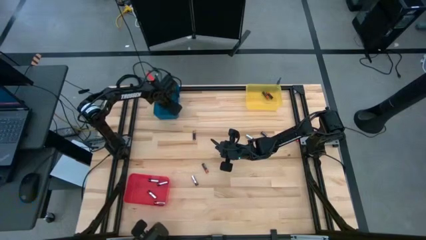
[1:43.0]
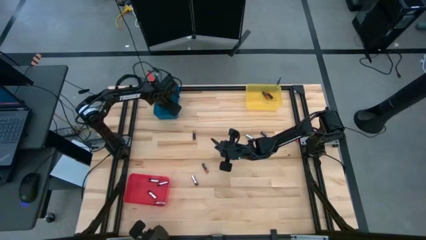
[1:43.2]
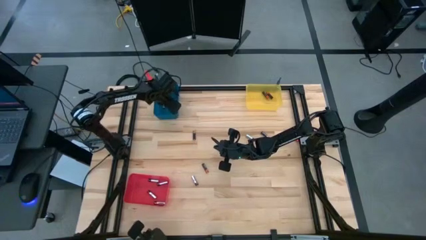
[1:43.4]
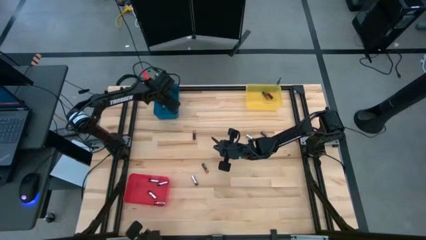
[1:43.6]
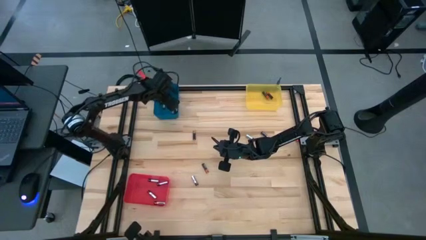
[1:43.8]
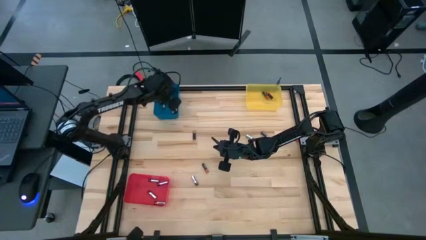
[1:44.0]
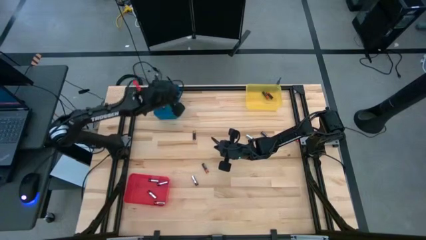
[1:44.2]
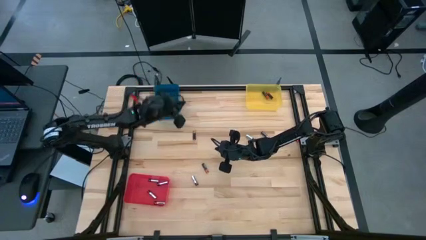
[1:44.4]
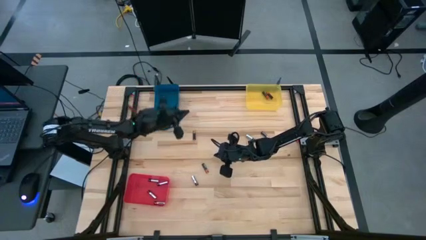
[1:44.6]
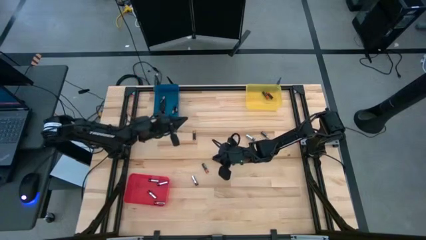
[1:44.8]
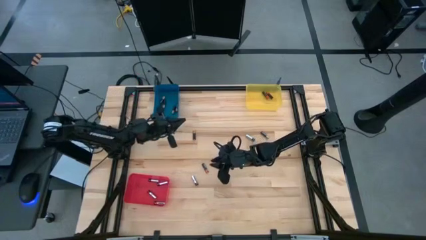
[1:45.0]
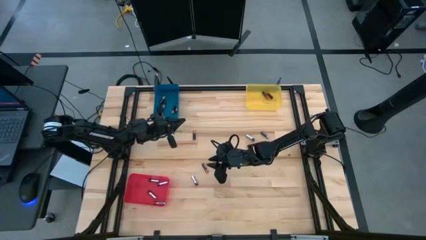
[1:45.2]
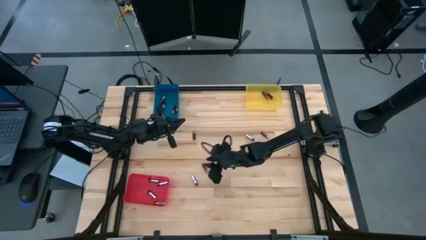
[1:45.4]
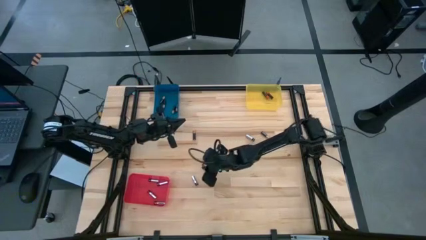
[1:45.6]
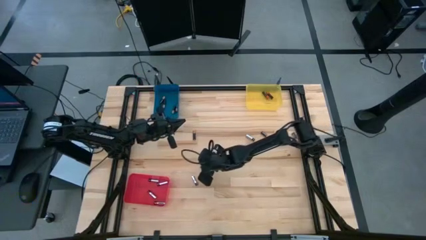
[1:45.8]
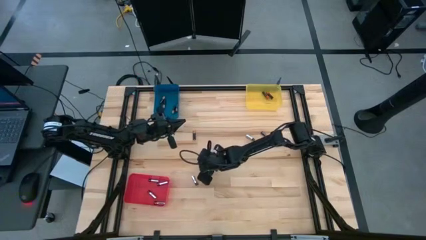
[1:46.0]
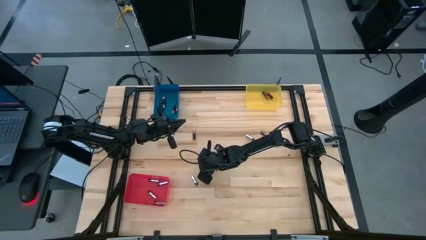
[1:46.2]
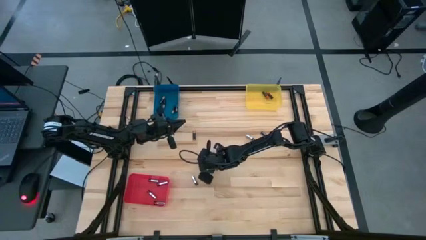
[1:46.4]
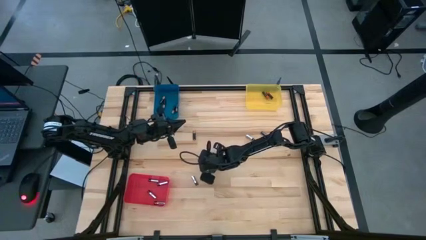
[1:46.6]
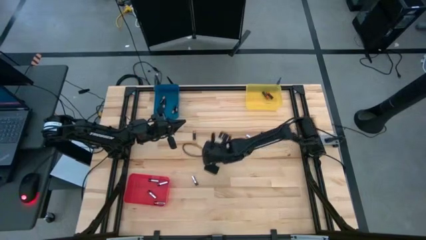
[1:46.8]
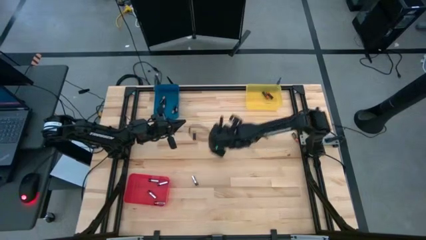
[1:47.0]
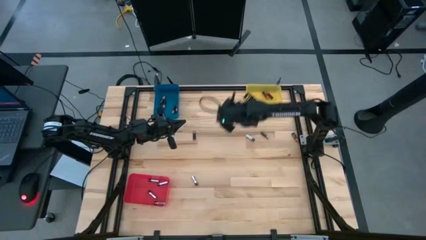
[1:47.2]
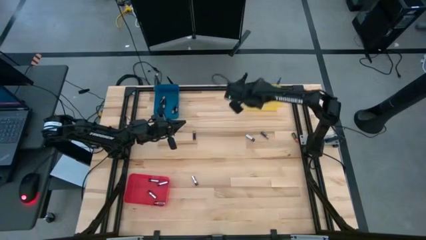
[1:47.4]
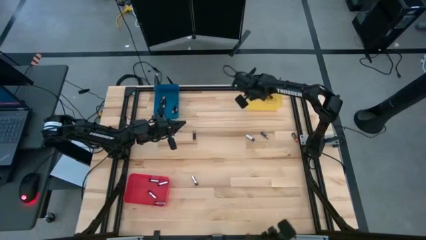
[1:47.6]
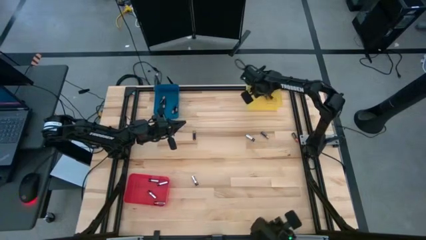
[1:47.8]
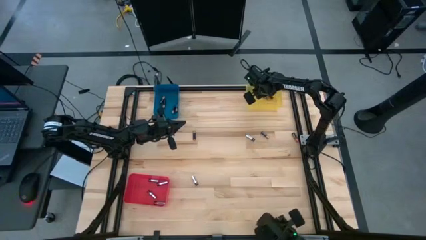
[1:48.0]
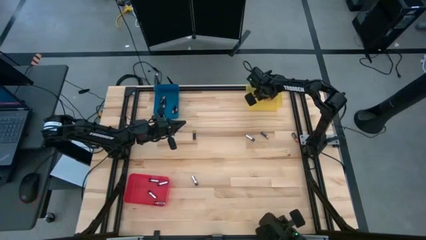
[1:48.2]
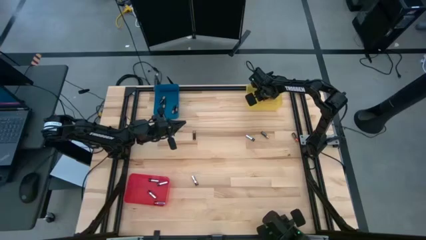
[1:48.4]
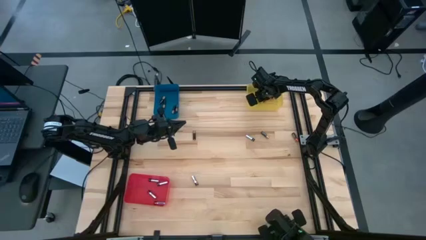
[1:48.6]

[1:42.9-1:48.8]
Task: Sort batteries
Put the red battery into the yellow bin

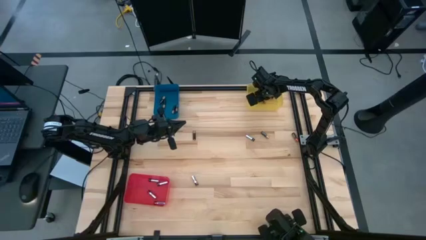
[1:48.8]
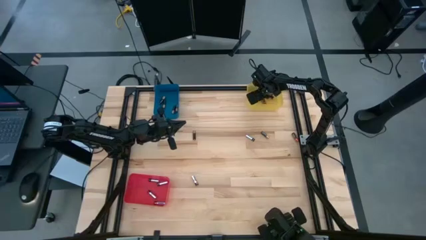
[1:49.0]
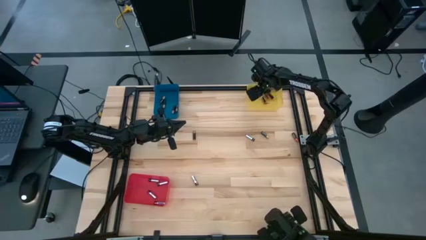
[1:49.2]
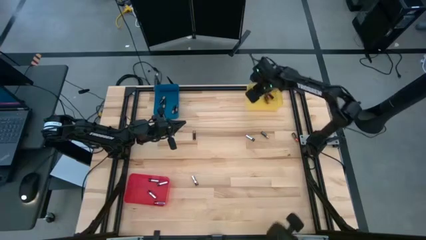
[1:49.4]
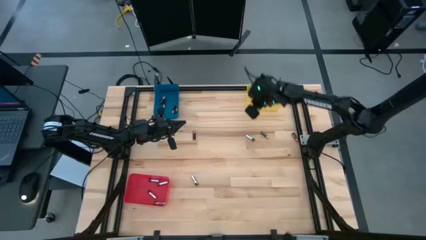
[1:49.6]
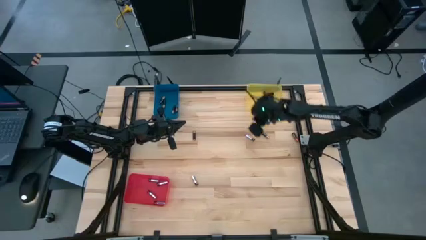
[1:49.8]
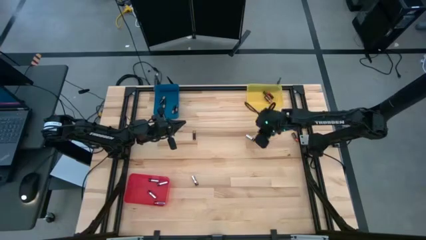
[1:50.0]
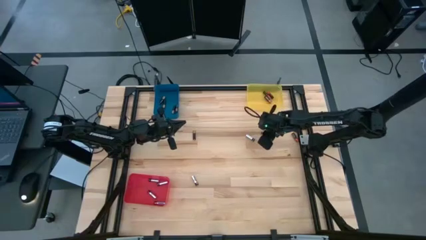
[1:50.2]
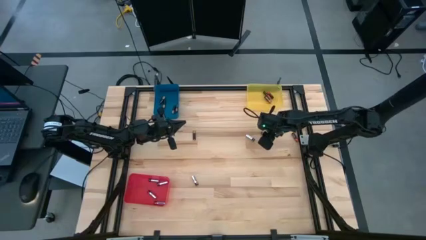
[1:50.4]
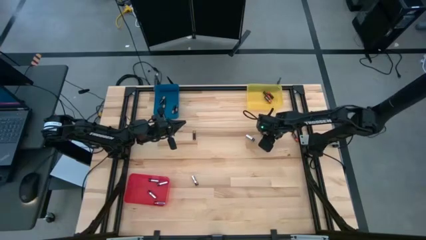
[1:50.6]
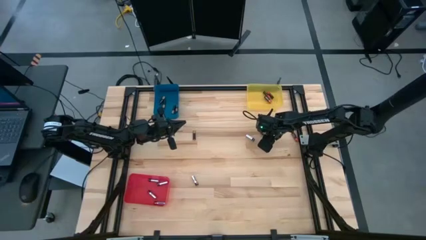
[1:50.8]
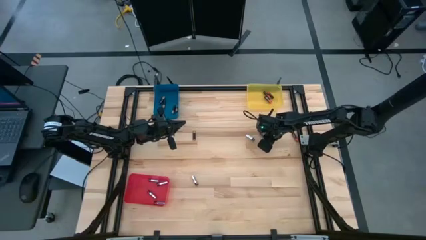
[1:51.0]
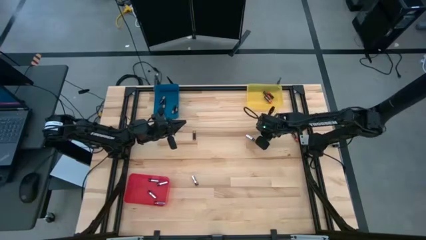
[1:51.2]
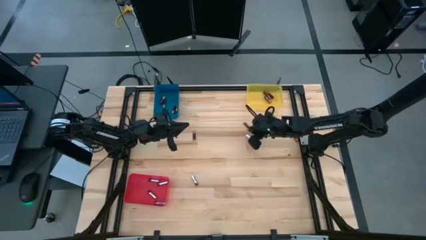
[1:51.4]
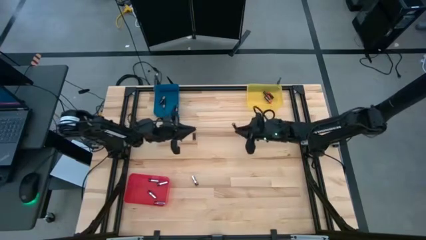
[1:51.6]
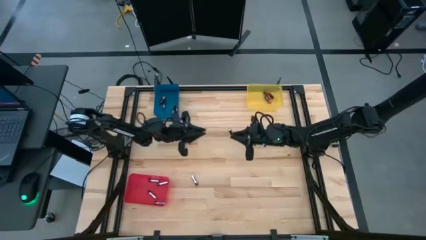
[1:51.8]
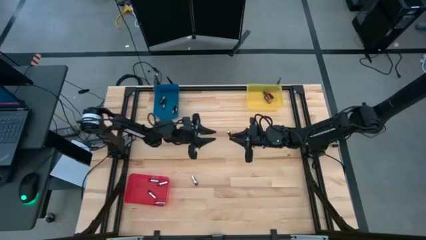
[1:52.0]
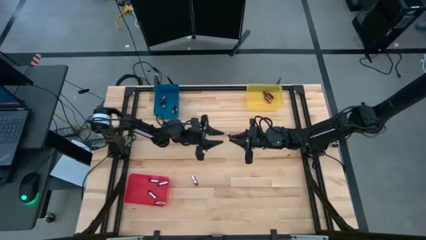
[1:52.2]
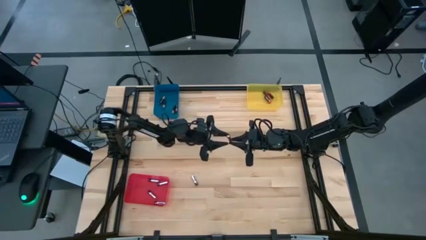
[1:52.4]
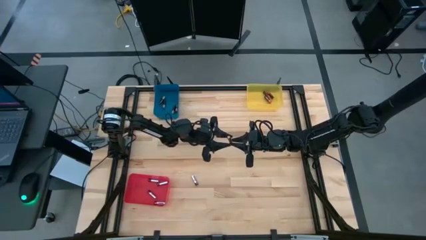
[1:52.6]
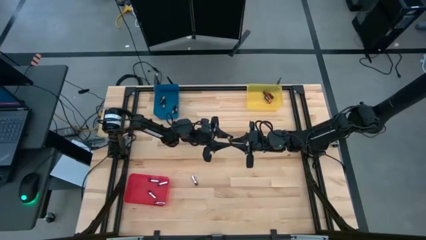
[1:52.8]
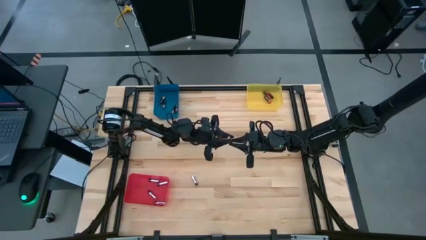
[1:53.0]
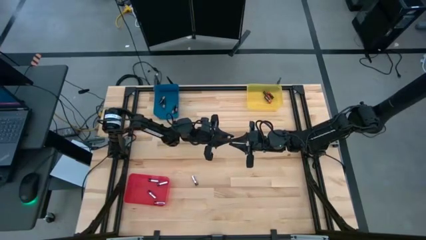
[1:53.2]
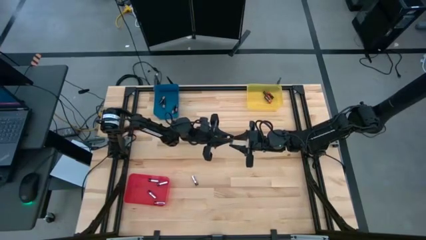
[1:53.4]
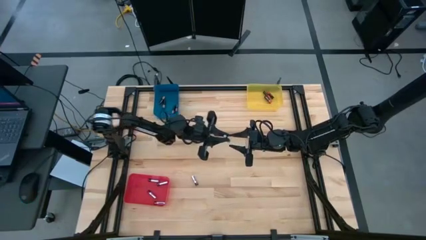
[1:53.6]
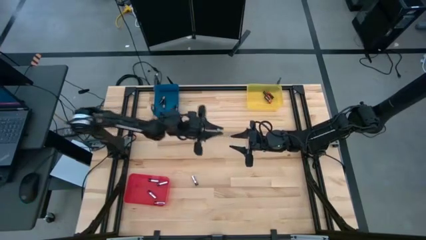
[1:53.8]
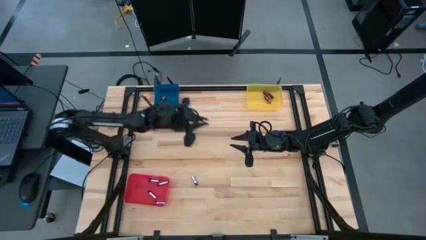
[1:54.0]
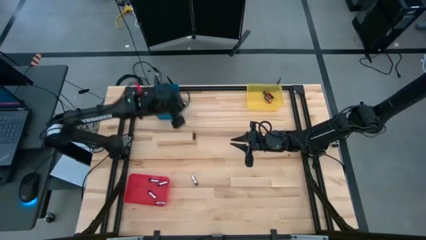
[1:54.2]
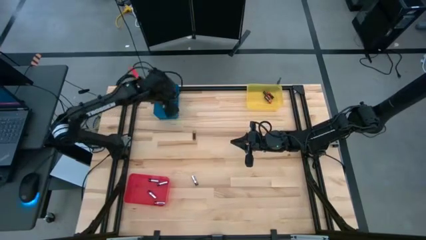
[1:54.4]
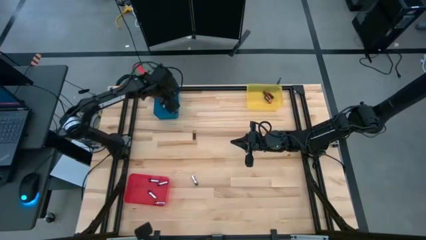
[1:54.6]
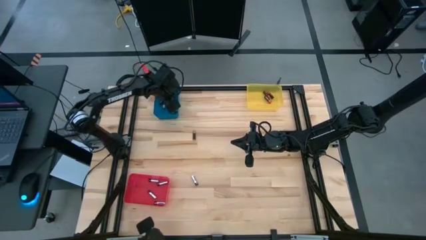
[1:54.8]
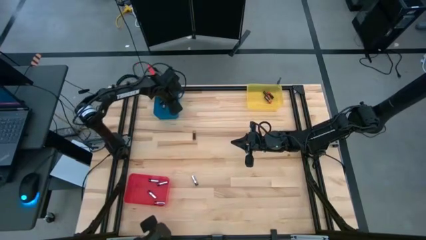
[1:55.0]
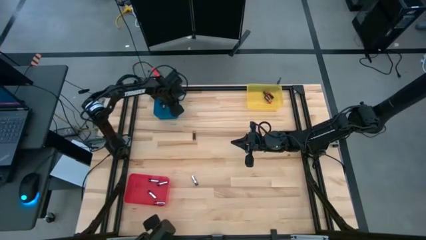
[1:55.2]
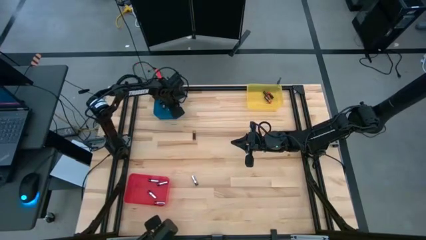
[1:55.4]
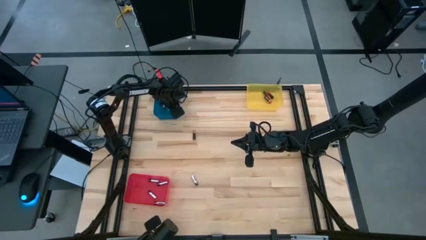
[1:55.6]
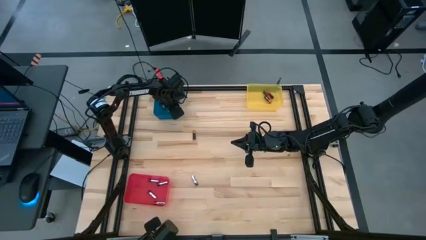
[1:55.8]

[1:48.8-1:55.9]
Put the black battery into the blue bin

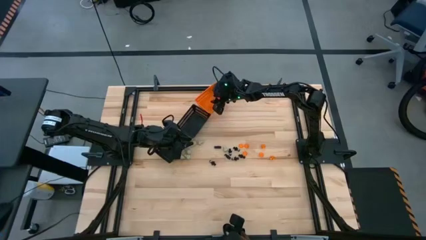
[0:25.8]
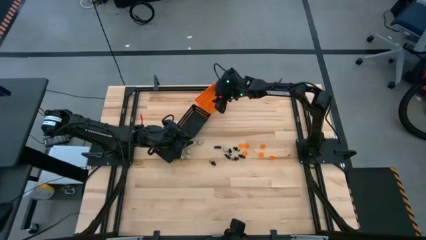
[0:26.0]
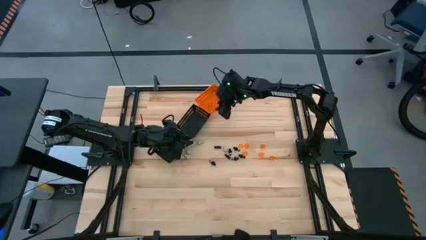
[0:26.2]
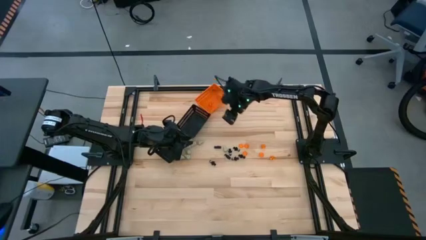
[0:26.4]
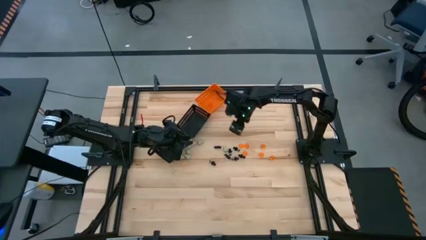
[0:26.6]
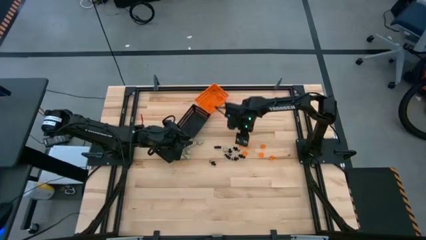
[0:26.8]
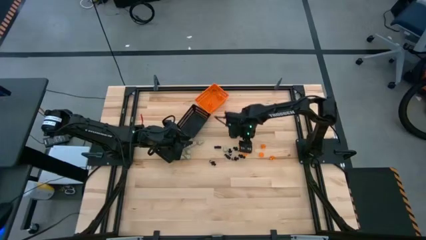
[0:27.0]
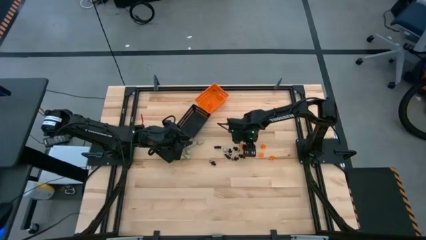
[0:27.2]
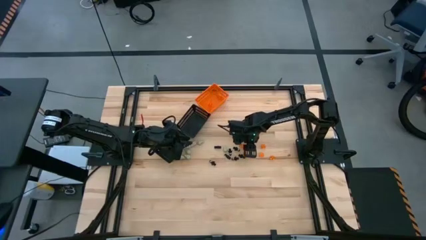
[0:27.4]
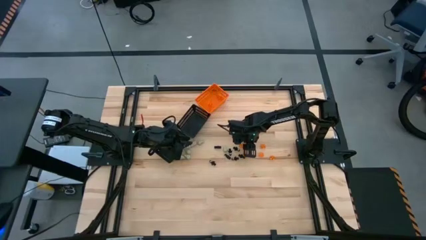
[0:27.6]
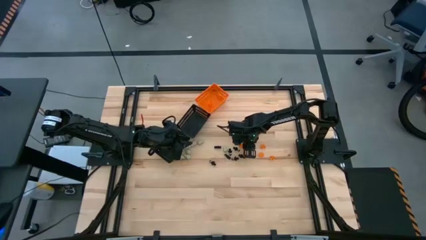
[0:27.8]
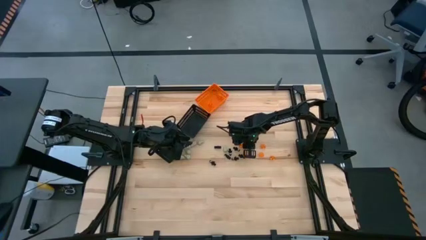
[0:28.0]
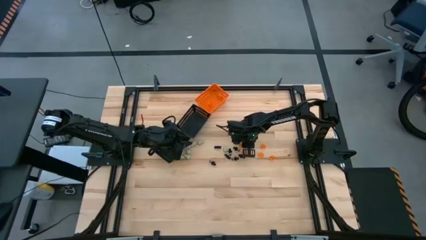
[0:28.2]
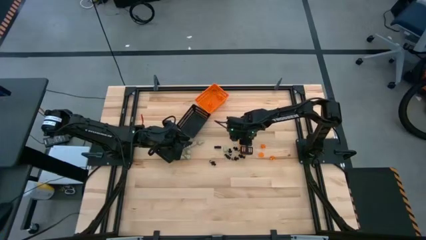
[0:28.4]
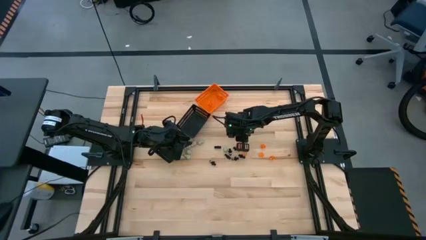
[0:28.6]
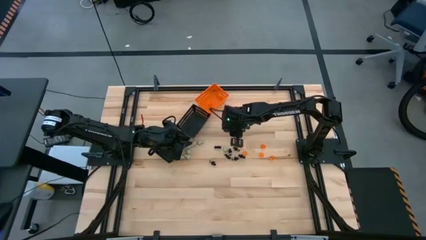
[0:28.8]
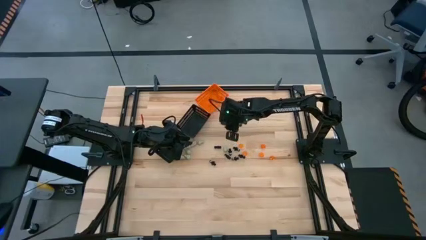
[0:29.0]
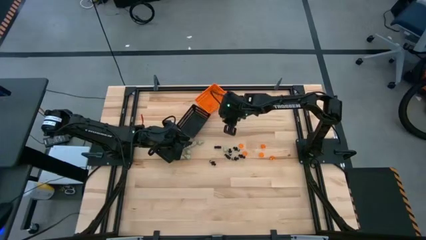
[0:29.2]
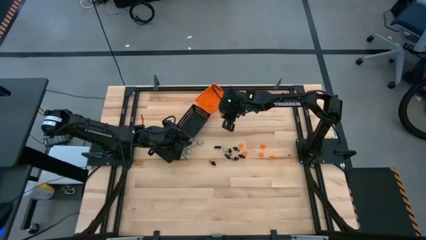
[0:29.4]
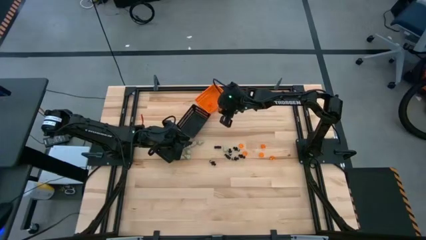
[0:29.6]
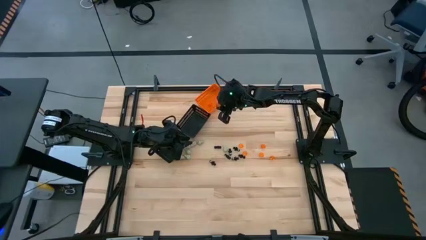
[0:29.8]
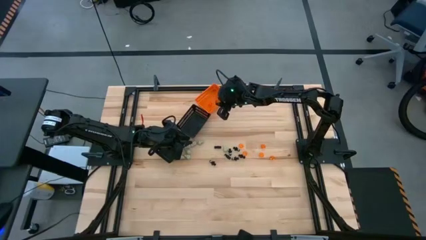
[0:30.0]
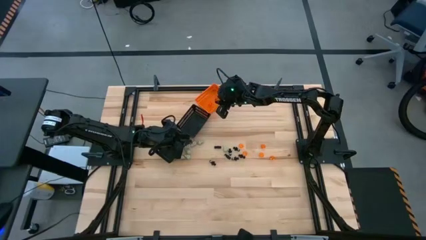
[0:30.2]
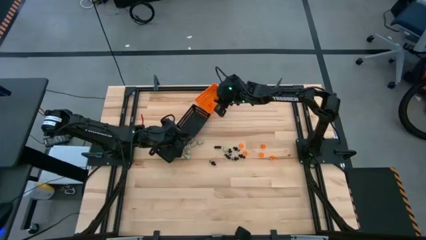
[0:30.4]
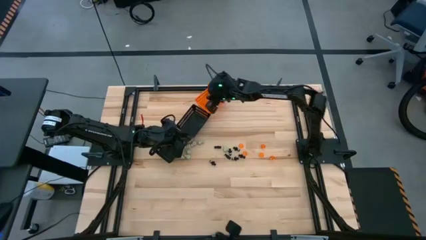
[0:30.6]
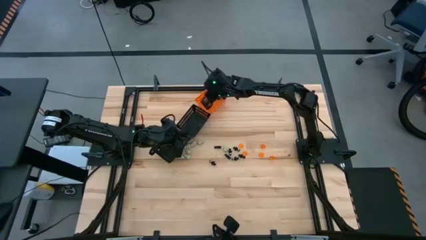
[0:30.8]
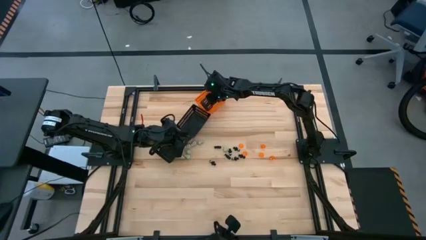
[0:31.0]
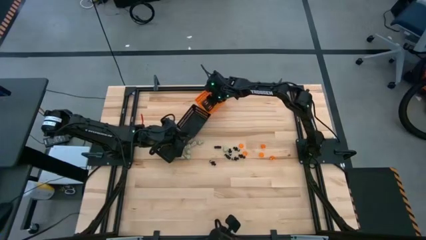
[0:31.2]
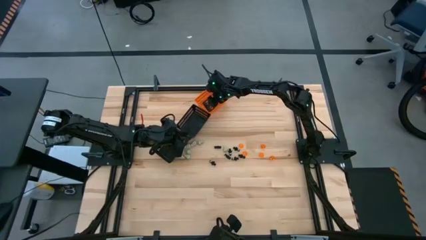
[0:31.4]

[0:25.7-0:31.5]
Task: Sort Halloween decoration
Put the orange pumpkin toy into the orange bin
